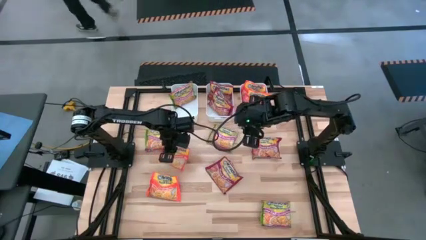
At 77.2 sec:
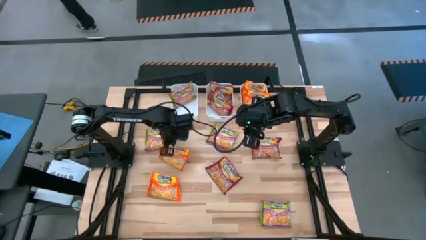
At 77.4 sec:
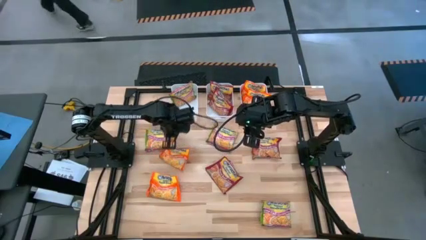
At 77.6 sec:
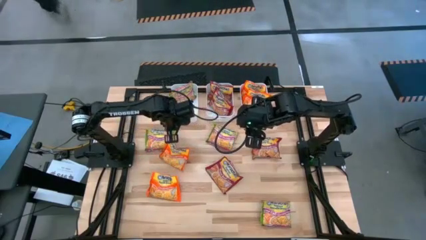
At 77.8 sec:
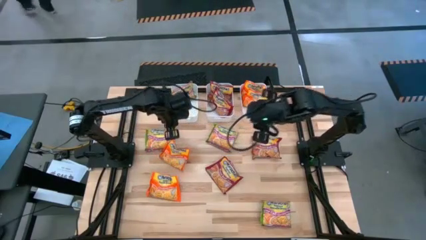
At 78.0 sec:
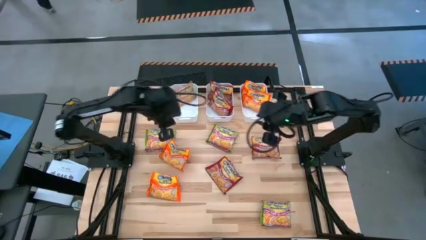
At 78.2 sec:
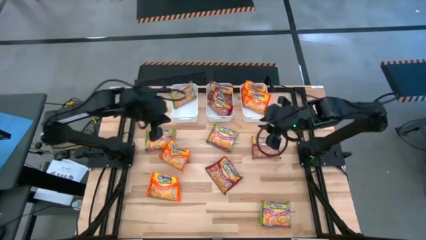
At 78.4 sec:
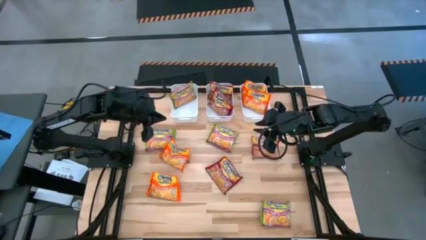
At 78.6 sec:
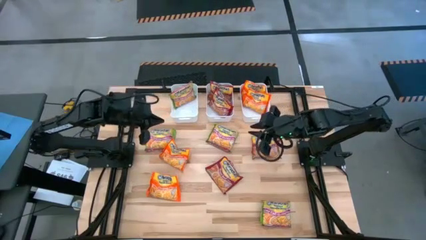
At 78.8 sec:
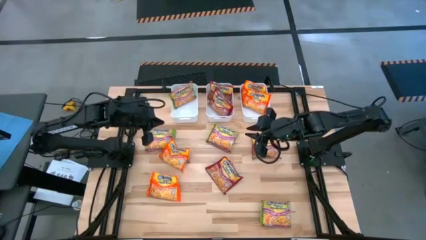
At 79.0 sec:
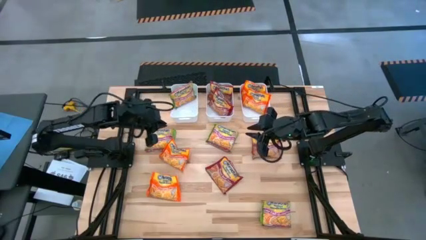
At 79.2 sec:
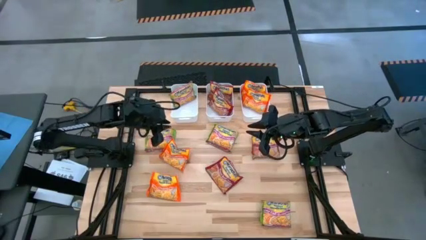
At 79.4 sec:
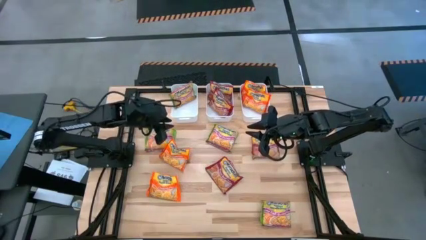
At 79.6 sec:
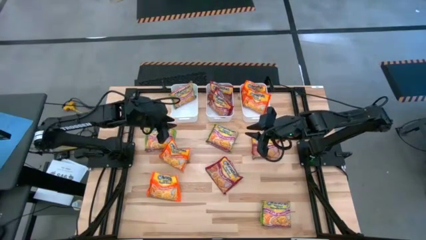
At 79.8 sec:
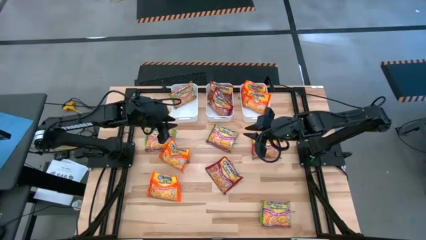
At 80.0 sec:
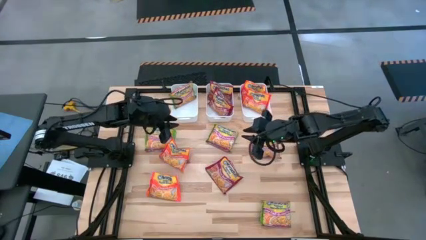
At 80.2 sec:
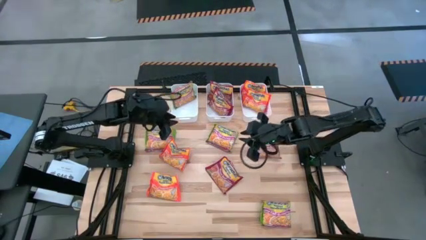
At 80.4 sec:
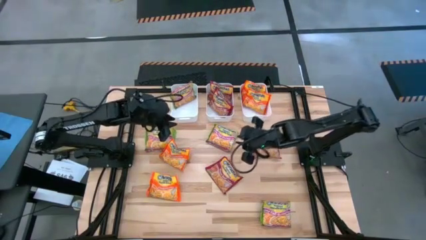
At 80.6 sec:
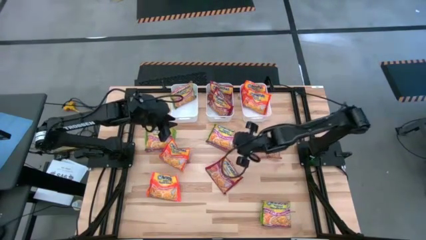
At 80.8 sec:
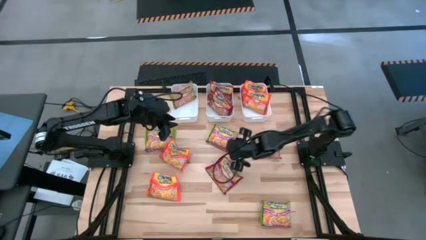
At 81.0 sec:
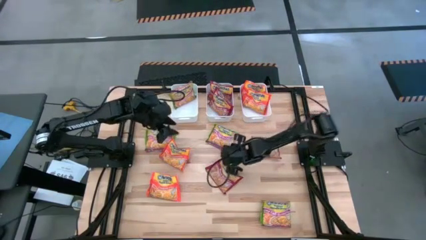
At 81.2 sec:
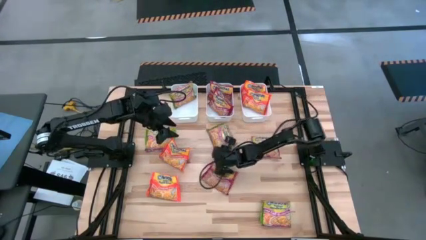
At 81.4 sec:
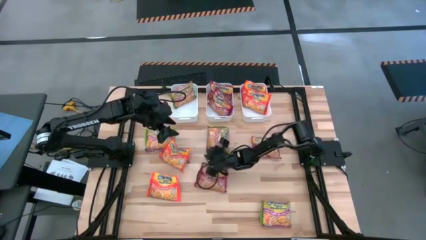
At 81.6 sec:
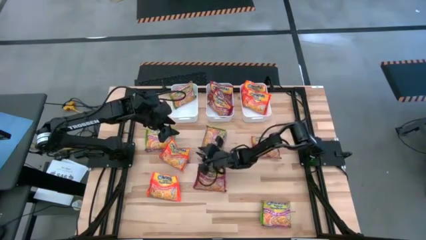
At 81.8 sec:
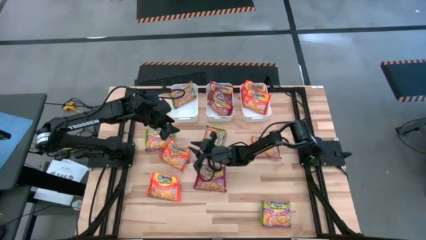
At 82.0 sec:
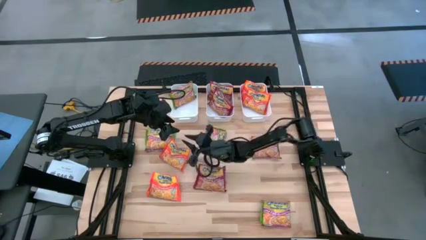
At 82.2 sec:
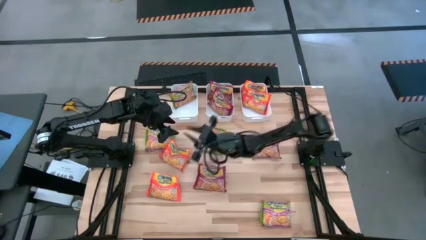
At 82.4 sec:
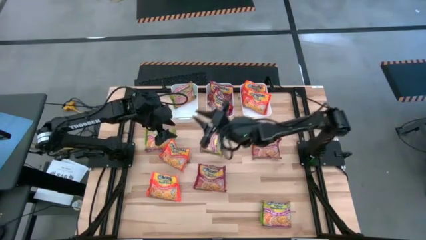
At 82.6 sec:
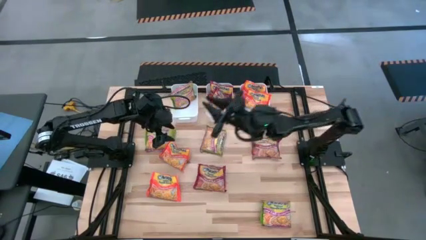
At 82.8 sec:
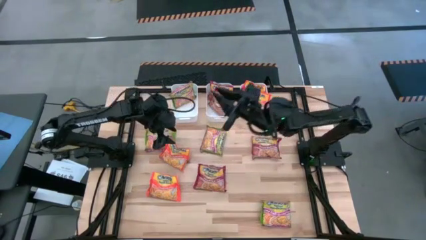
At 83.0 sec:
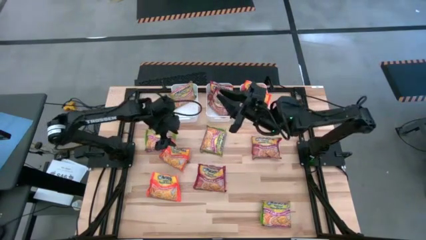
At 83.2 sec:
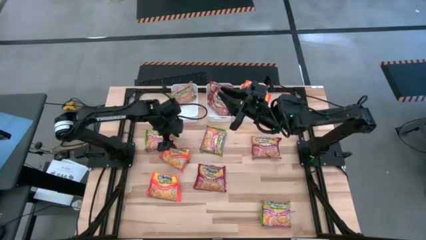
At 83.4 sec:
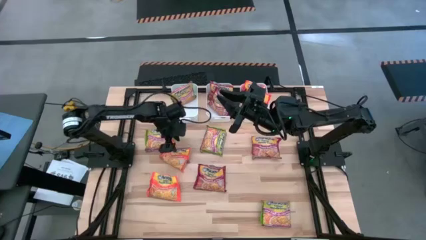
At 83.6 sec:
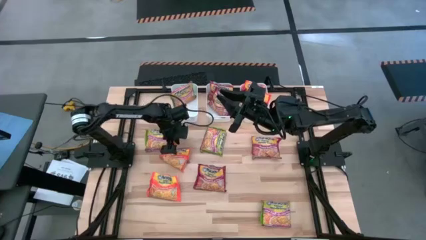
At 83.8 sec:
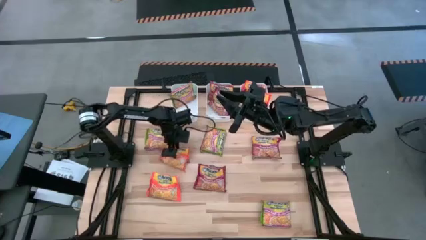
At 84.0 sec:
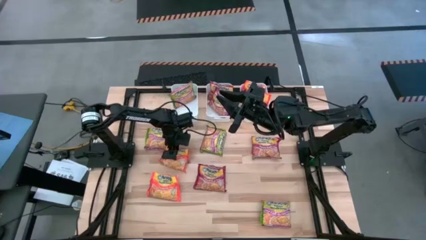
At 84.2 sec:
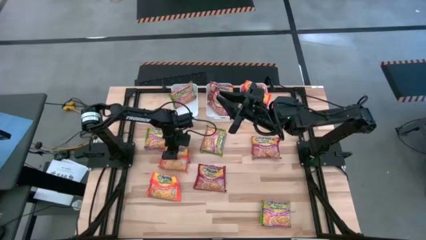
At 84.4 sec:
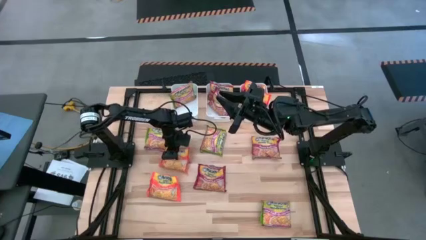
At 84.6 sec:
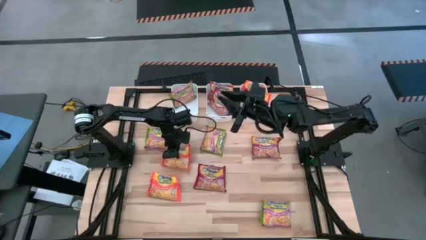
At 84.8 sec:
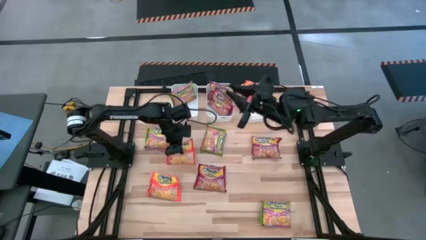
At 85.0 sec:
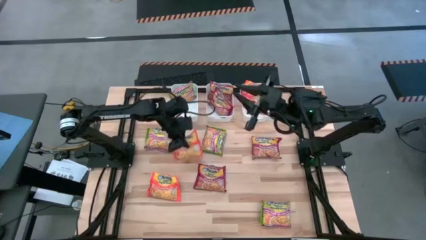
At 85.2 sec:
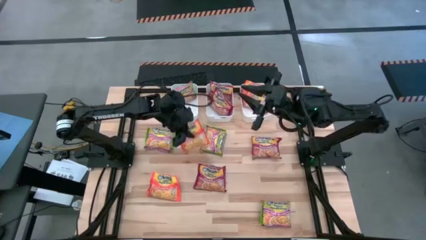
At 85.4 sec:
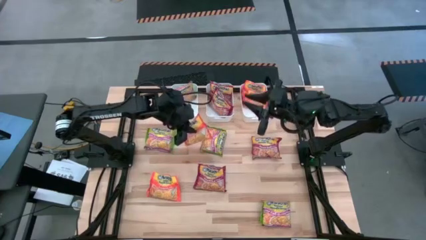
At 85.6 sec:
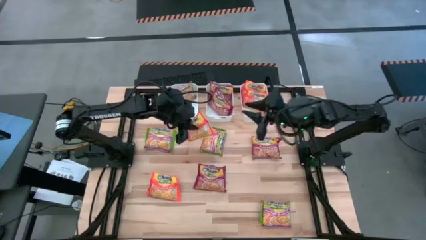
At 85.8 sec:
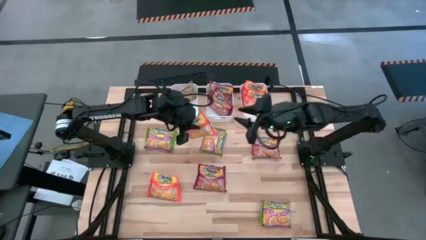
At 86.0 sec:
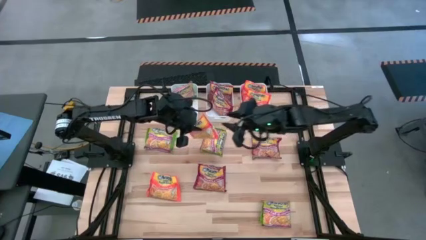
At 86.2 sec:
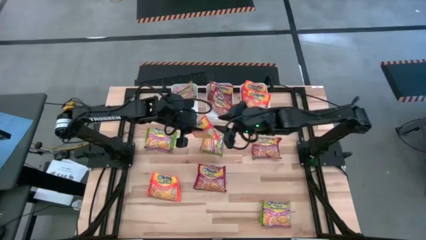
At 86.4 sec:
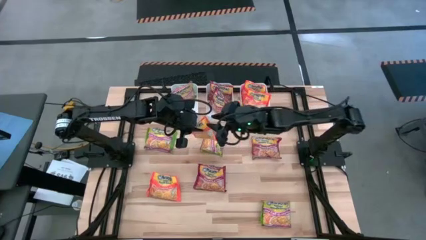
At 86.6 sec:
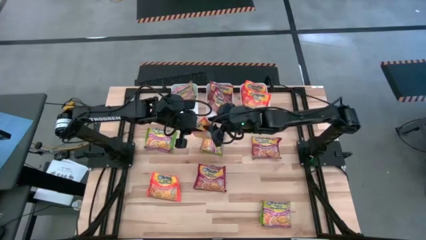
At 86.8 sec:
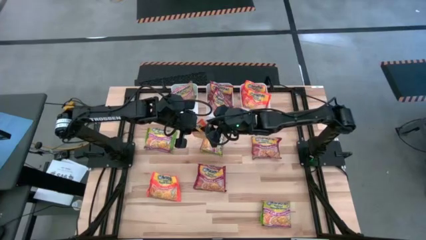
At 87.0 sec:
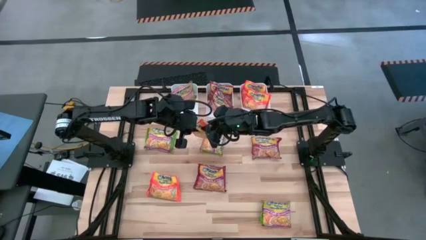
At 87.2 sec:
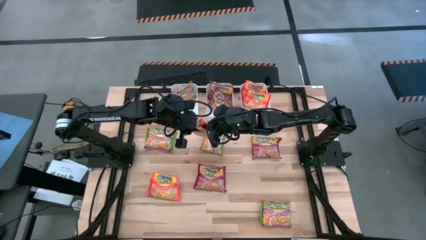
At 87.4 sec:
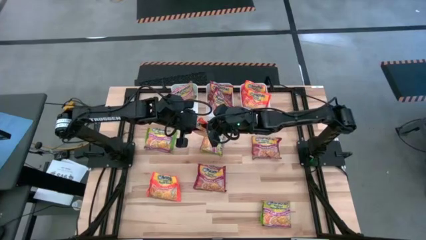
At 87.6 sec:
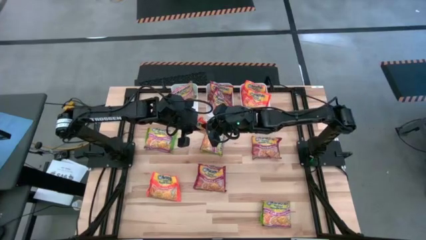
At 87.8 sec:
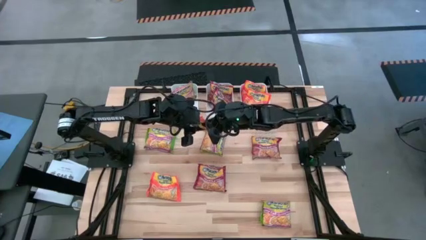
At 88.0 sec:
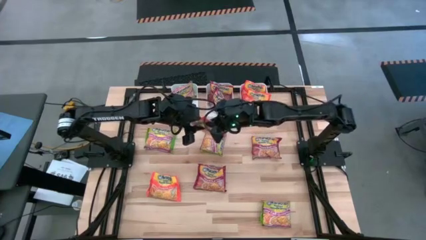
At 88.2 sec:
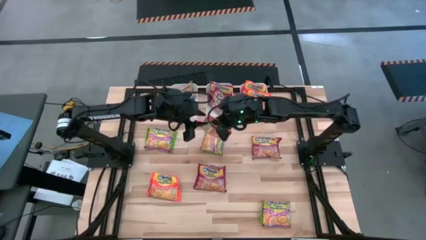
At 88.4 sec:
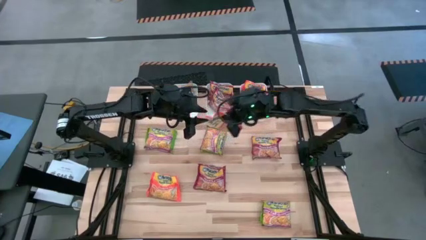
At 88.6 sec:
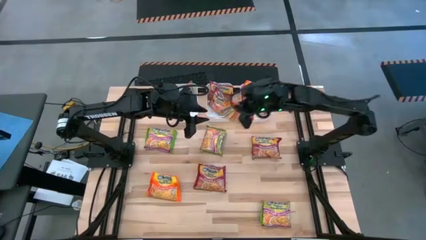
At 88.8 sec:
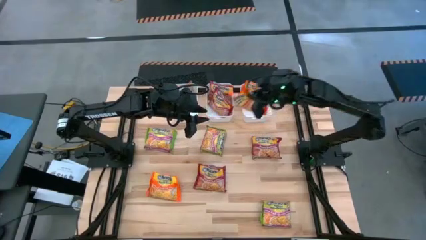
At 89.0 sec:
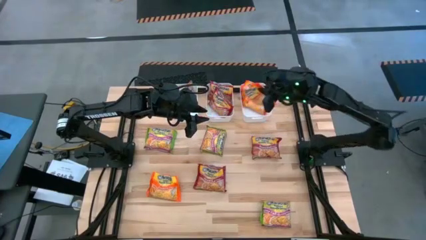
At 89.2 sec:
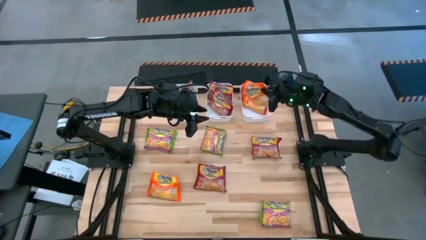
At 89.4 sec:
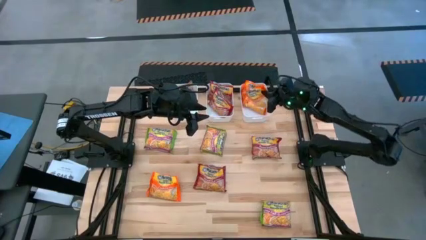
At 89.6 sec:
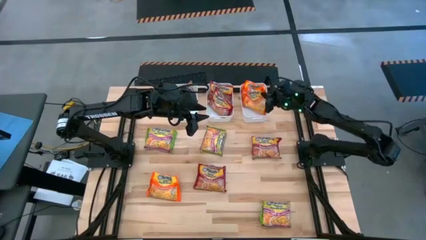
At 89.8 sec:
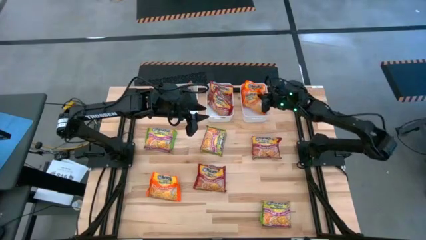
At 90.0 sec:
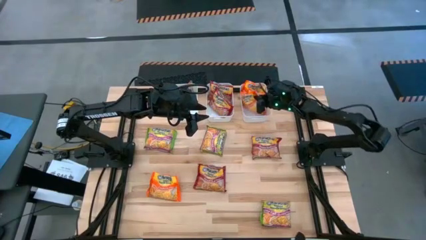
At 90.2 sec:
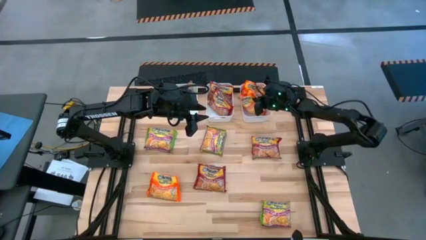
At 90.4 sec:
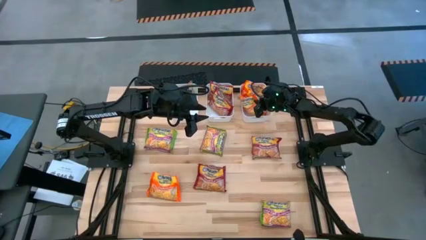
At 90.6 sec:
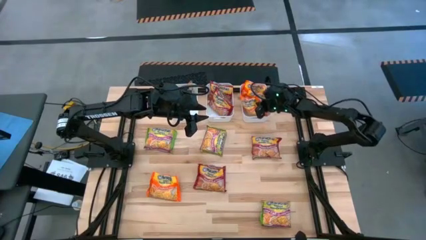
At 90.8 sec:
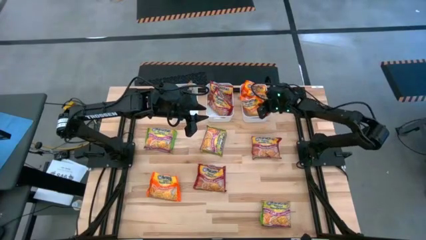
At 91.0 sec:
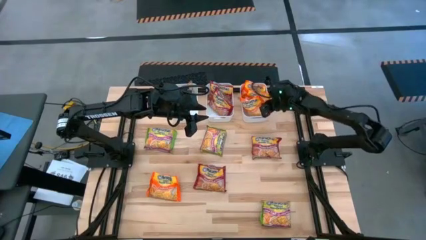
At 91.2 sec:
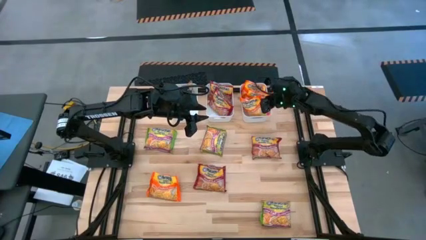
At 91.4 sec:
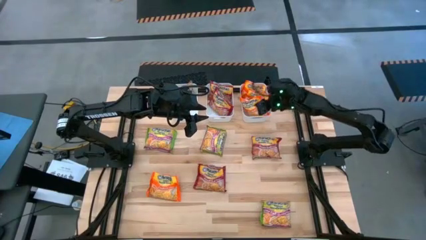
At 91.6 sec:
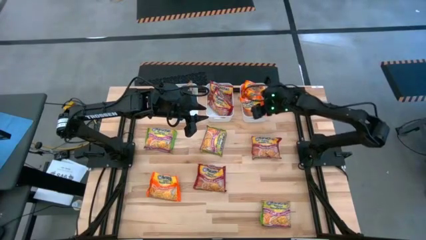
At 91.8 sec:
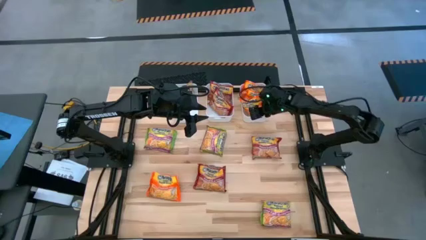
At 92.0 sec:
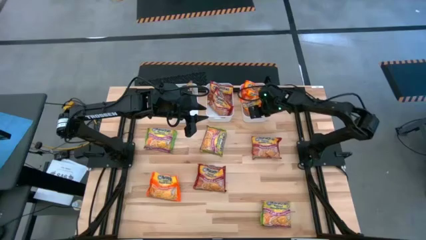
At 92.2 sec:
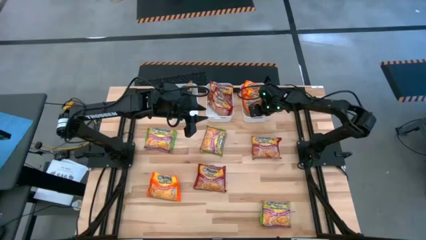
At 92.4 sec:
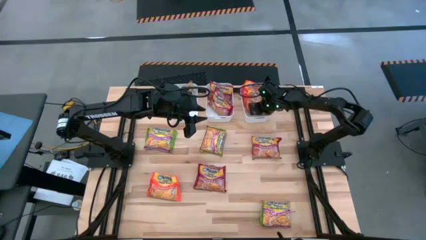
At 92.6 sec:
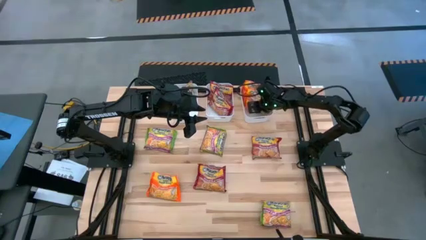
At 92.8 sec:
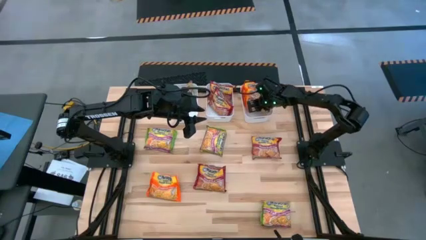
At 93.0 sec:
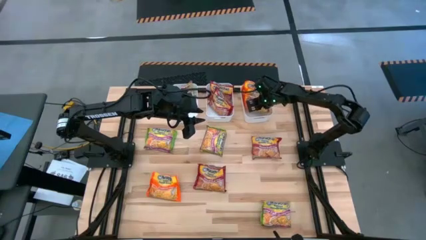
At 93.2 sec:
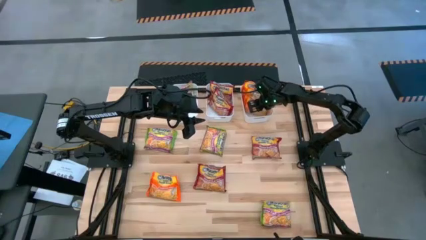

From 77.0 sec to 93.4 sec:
Task: Sort Maruchan noodles
Put the orange noodle pack into the right white bin

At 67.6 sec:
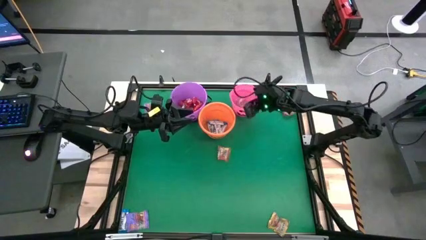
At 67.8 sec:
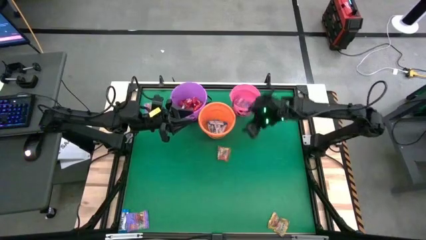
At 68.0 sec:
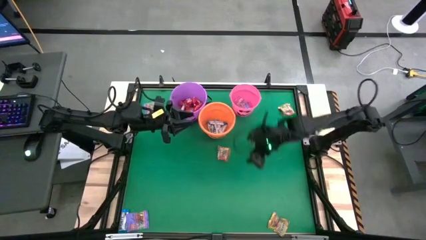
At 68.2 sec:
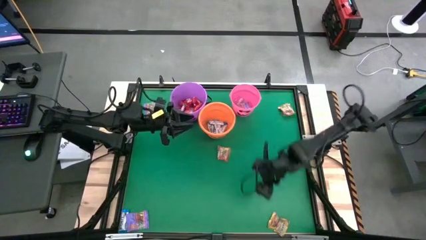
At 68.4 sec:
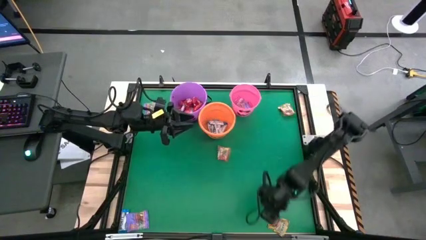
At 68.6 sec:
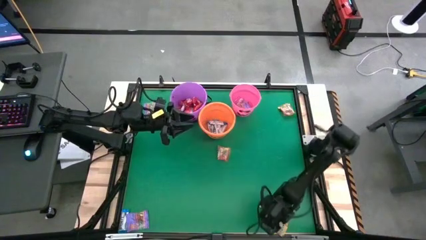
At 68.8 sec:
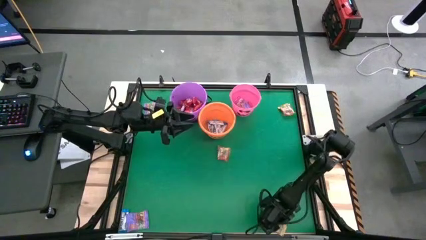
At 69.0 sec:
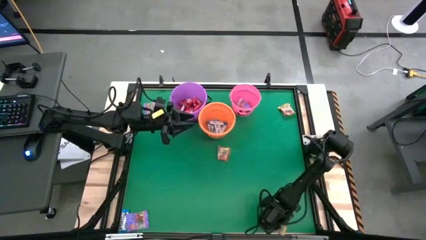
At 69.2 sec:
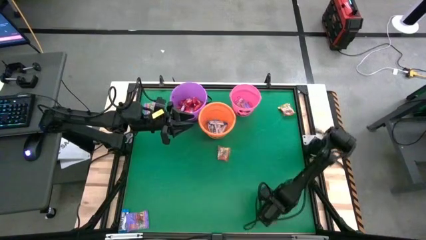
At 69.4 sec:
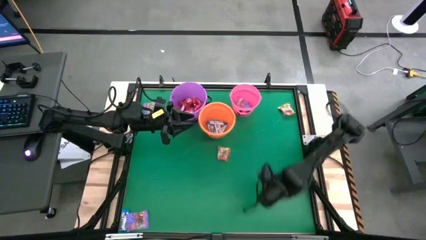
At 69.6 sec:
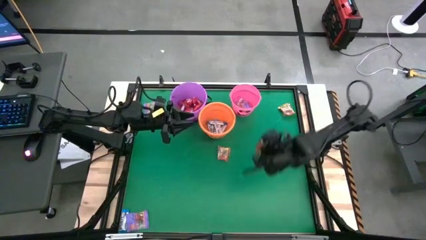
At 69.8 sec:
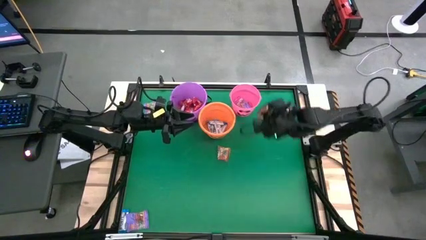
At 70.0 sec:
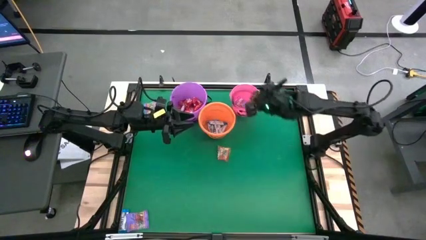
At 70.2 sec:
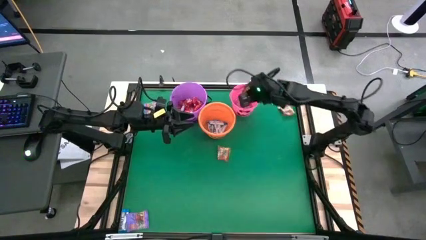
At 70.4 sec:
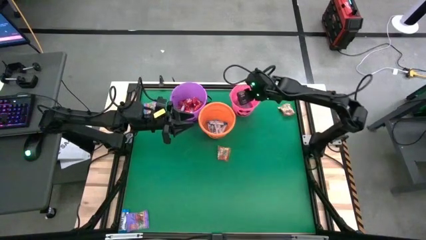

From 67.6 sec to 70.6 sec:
Task: Sort candy by brand, put in halloween buckets
Put the gold gummy candy into the pink bucket
